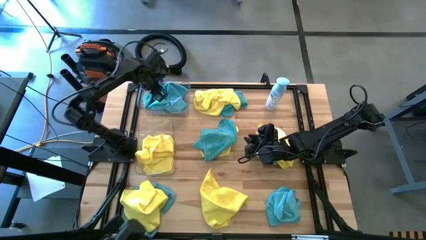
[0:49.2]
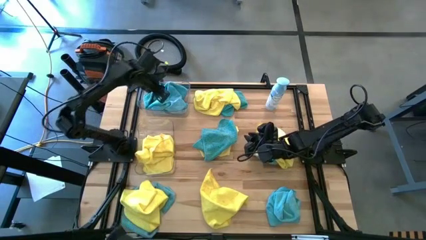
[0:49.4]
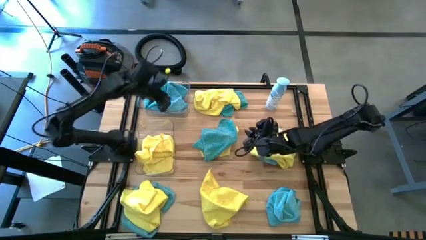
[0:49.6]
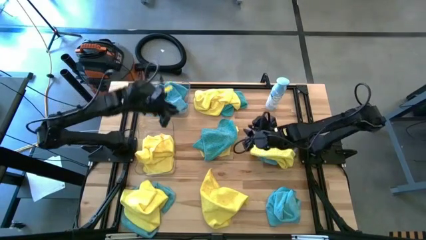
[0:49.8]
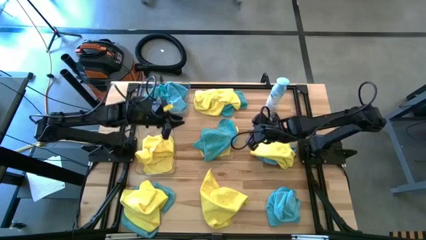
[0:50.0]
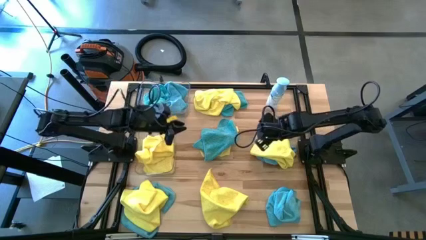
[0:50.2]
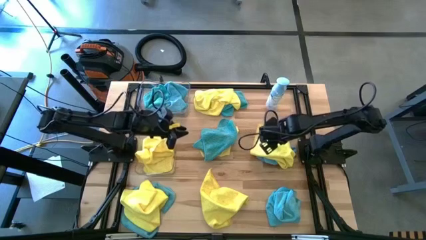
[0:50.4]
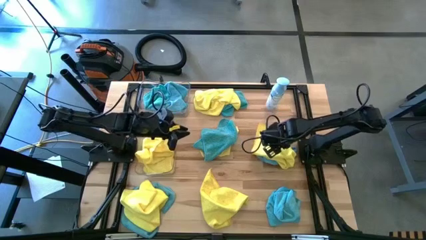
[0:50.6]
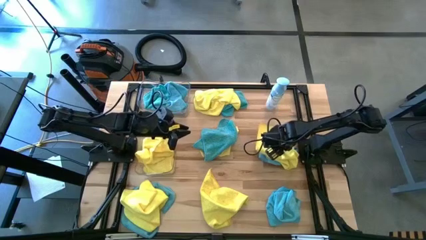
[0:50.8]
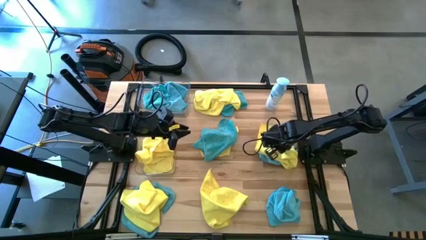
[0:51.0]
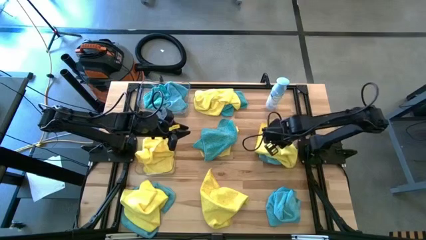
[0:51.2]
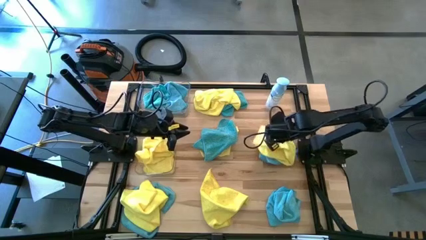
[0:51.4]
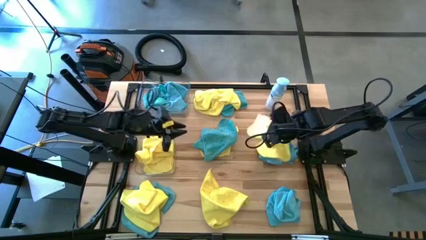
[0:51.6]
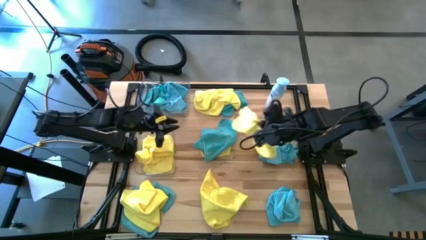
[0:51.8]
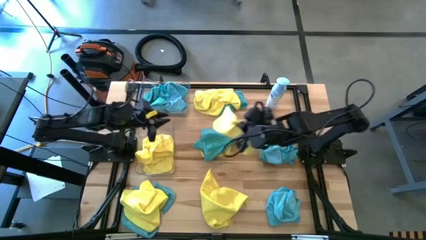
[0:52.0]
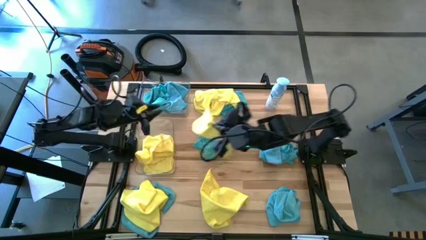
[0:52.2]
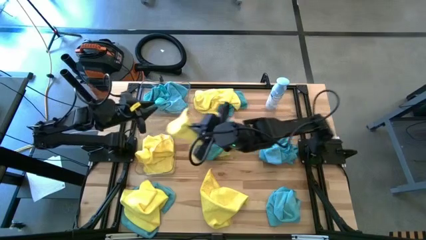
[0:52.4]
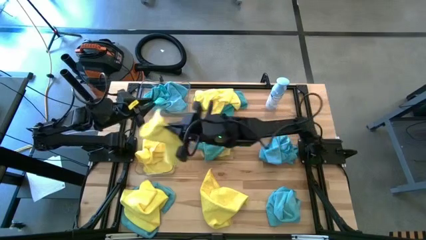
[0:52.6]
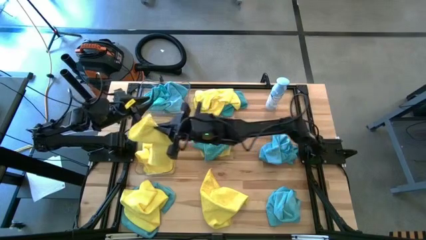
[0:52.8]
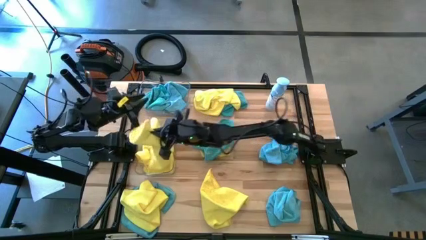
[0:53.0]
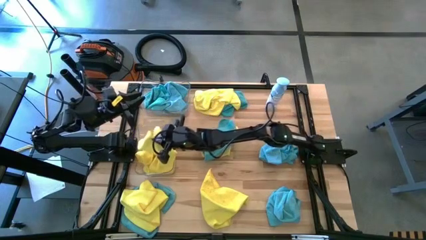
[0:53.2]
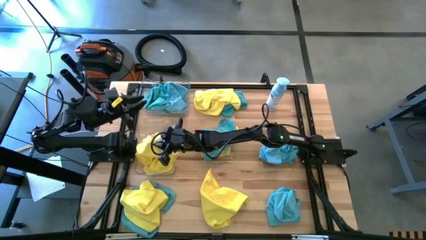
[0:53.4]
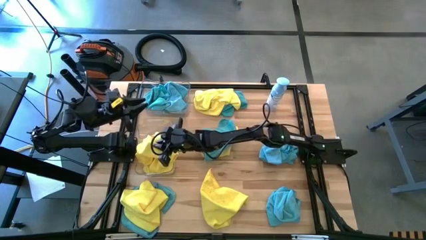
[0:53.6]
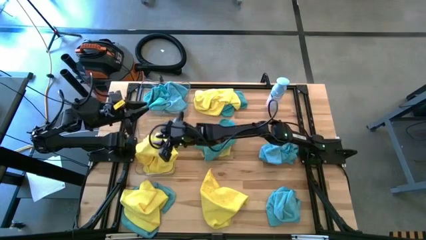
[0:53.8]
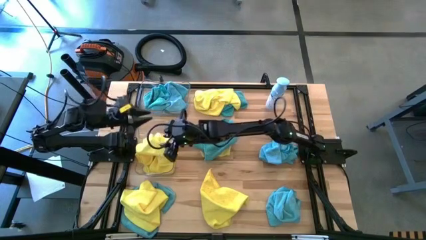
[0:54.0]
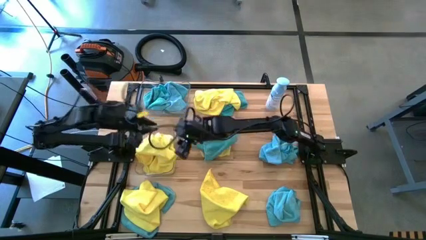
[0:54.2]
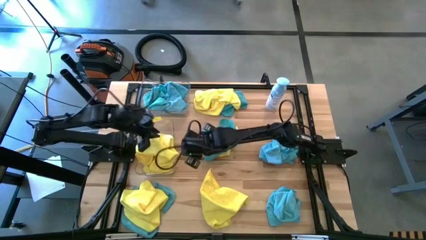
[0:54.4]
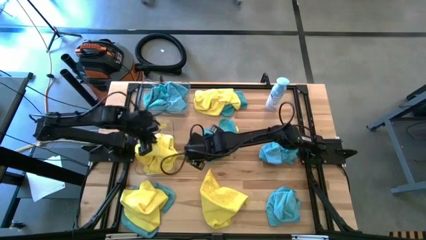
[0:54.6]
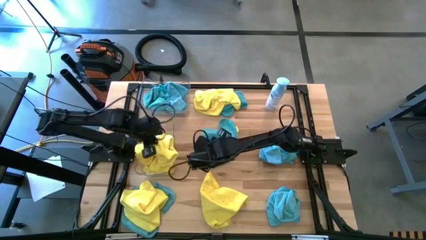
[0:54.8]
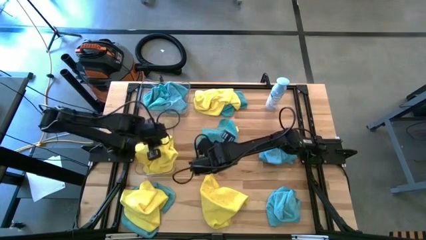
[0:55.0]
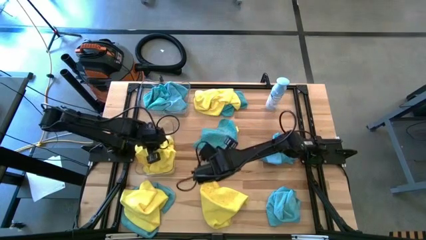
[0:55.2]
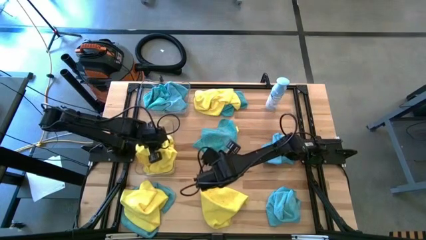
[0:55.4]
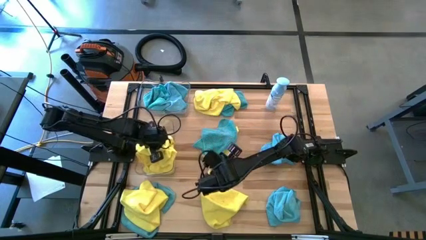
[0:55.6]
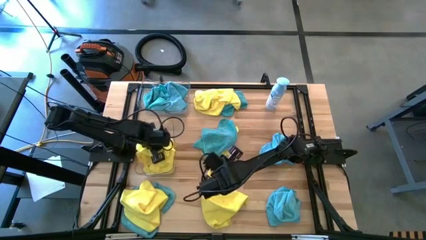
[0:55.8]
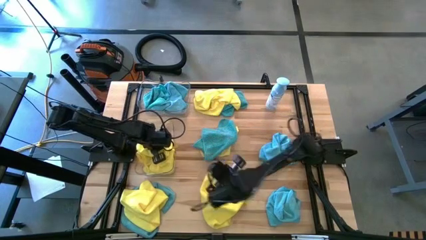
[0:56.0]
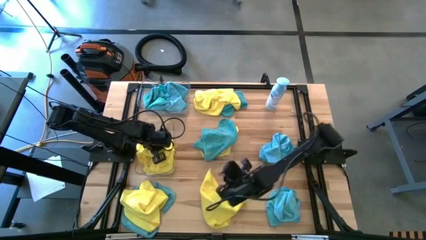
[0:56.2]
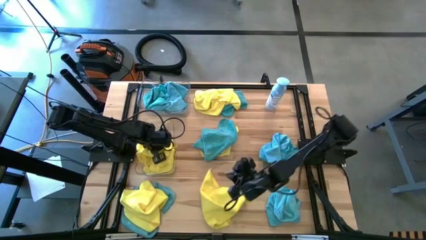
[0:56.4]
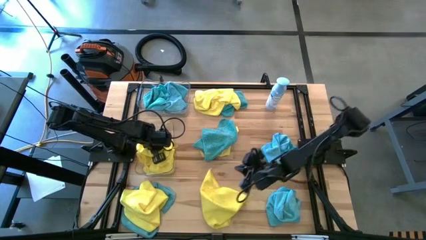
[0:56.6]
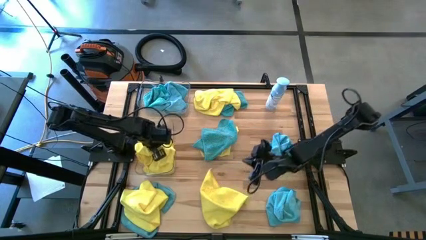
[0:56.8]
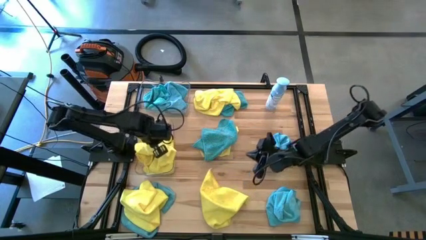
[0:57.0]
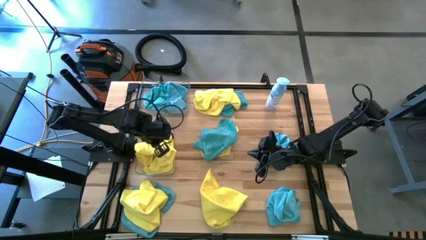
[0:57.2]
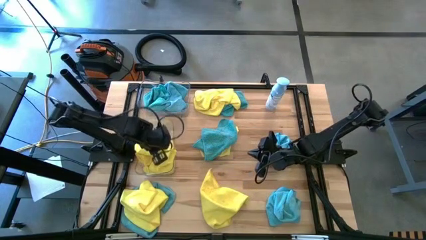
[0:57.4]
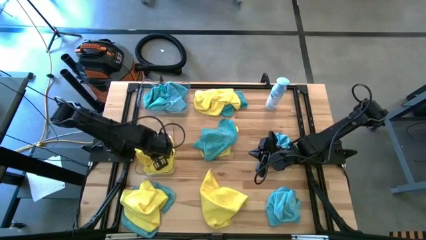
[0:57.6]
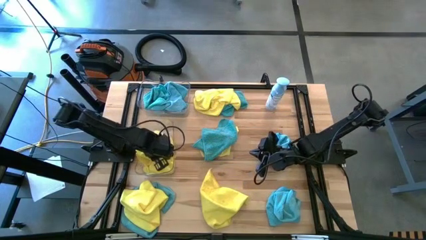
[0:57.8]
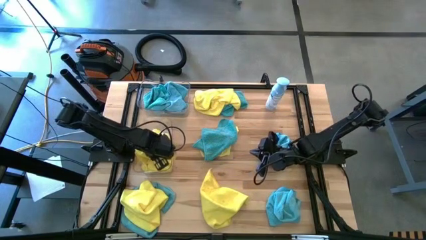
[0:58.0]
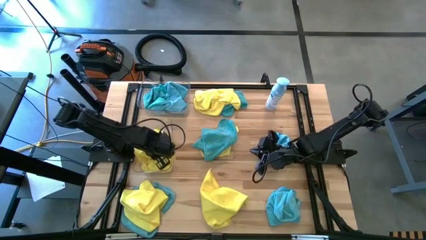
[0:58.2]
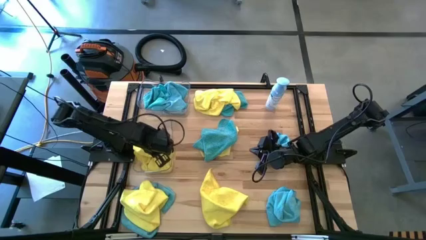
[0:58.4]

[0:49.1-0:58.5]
Task: Sort microfiber towel by color & place in baskets
Put the yellow towel into the bottom transparent bin

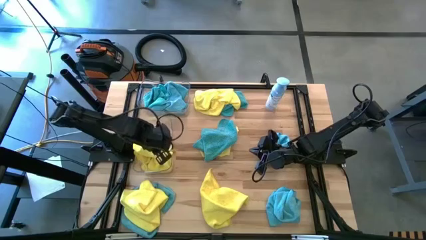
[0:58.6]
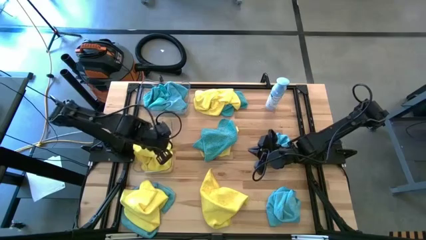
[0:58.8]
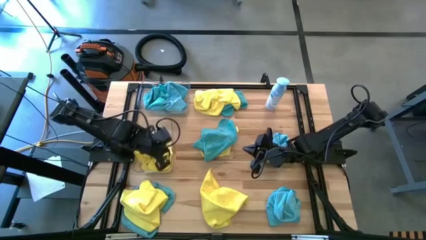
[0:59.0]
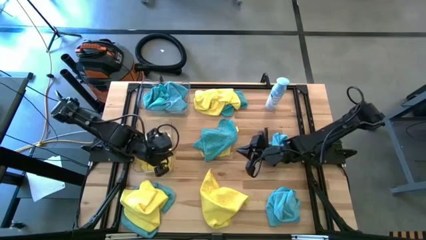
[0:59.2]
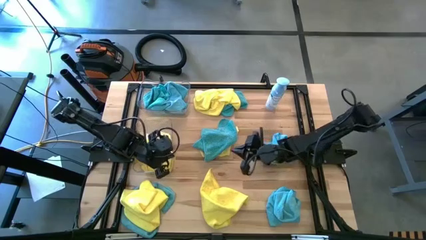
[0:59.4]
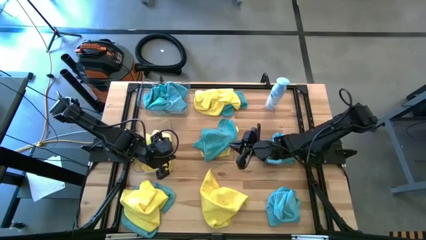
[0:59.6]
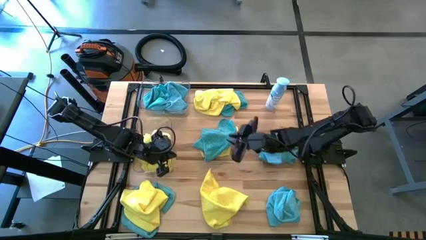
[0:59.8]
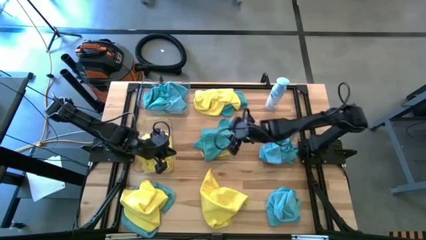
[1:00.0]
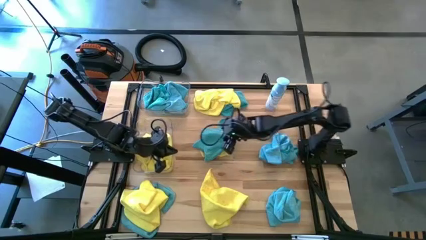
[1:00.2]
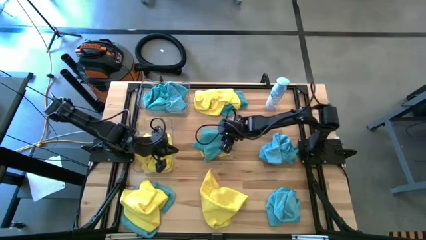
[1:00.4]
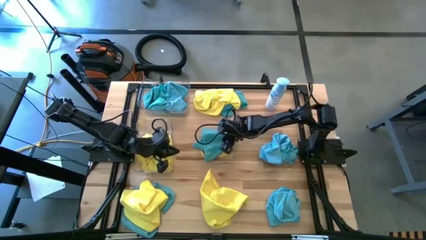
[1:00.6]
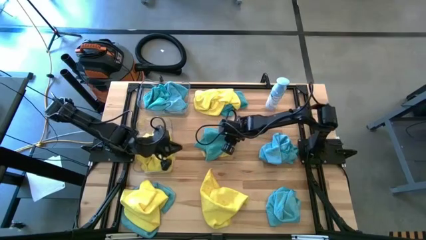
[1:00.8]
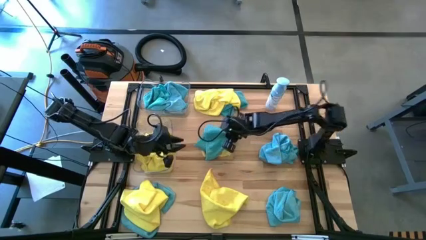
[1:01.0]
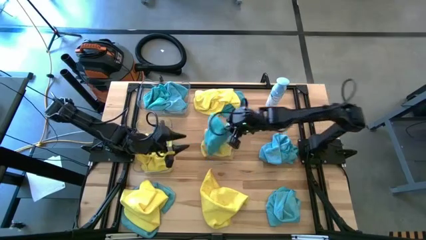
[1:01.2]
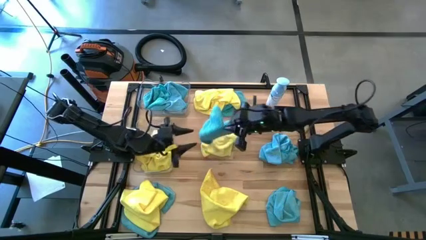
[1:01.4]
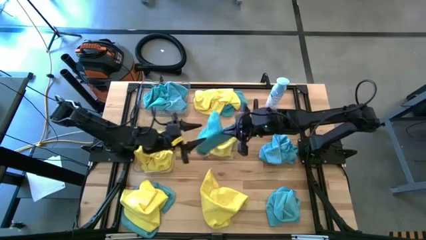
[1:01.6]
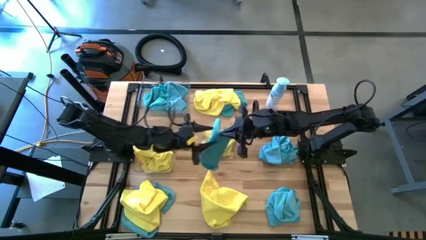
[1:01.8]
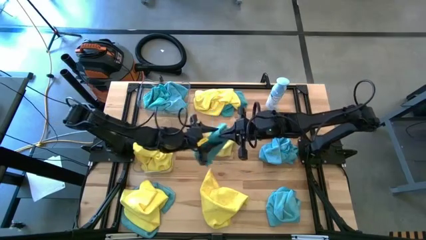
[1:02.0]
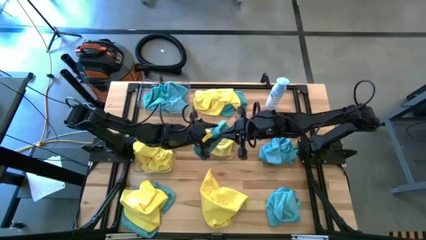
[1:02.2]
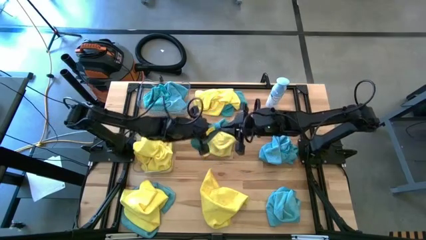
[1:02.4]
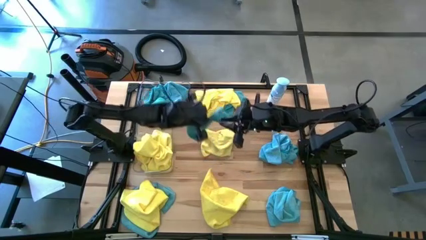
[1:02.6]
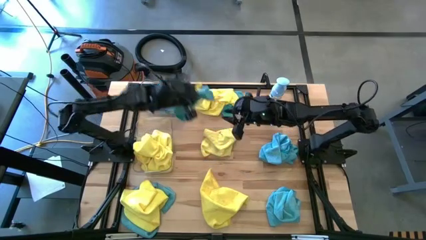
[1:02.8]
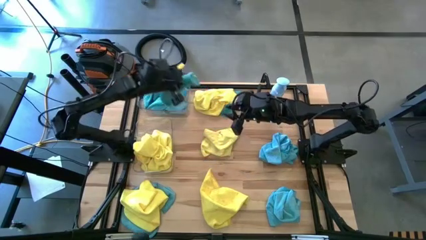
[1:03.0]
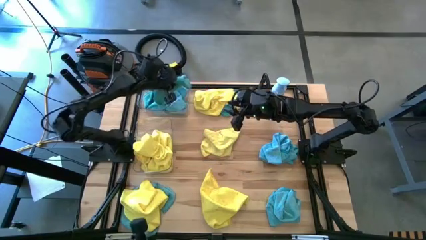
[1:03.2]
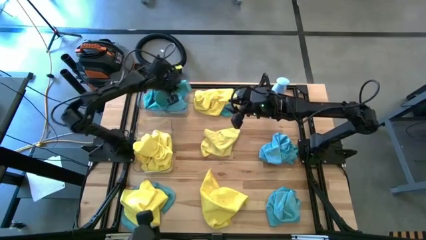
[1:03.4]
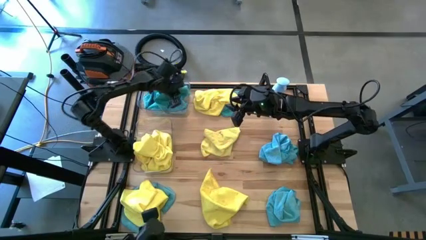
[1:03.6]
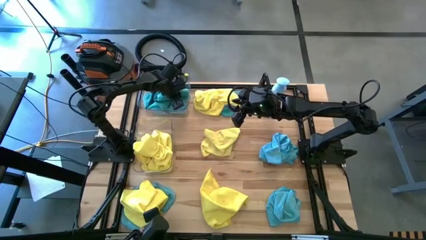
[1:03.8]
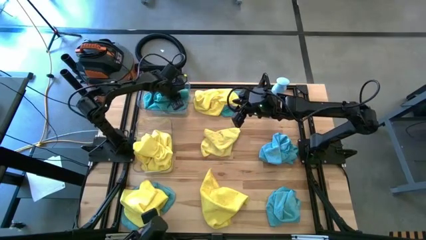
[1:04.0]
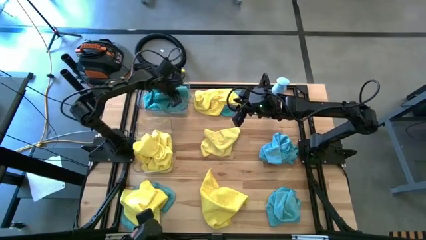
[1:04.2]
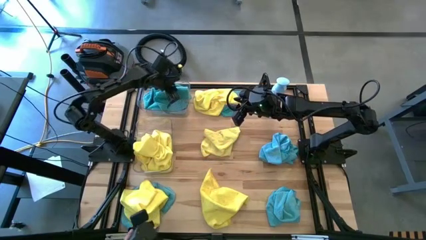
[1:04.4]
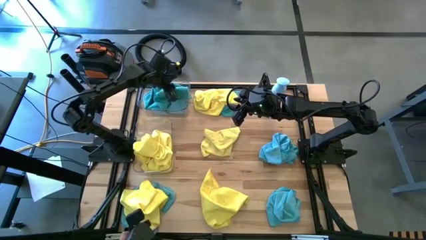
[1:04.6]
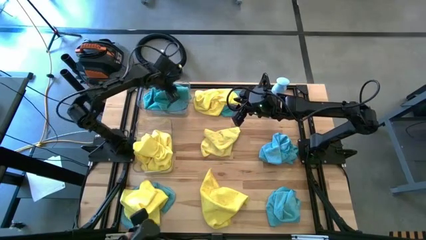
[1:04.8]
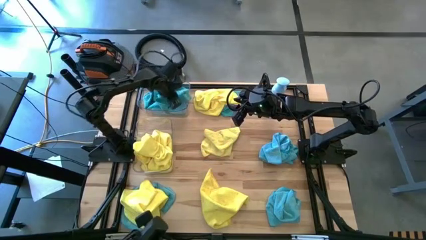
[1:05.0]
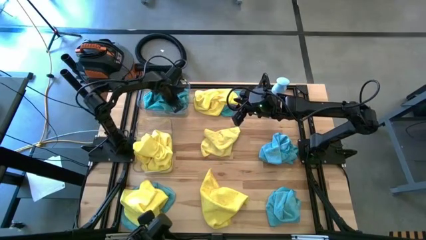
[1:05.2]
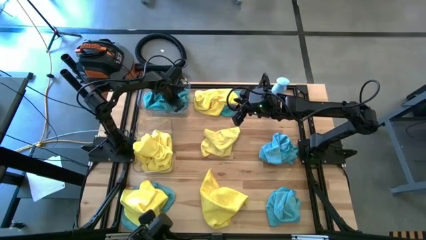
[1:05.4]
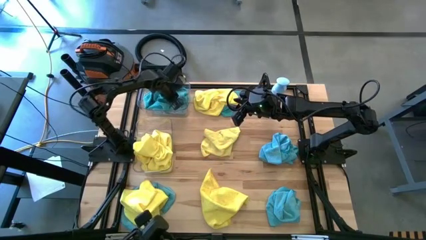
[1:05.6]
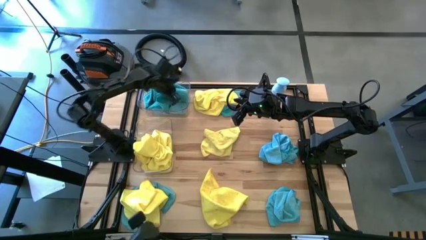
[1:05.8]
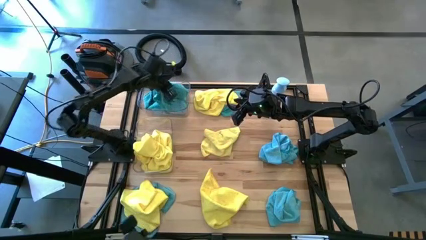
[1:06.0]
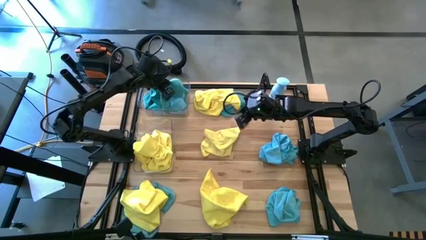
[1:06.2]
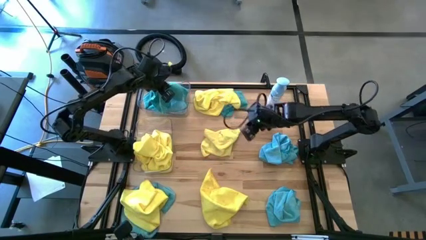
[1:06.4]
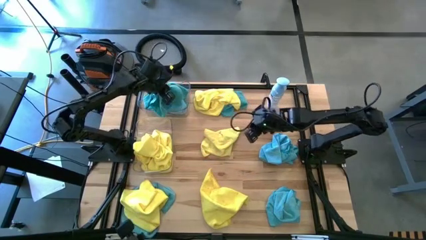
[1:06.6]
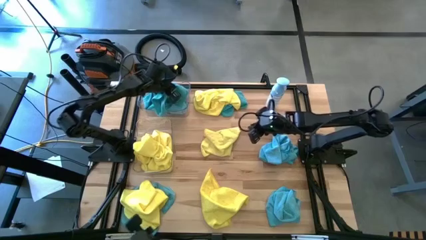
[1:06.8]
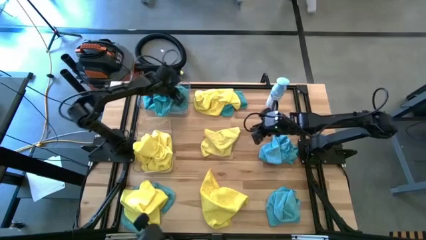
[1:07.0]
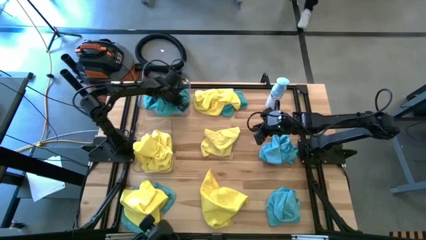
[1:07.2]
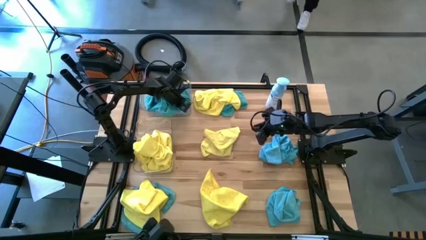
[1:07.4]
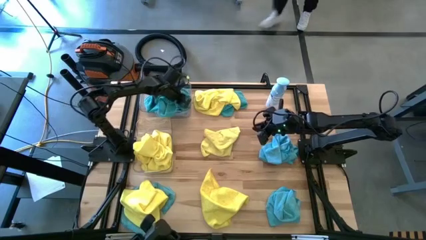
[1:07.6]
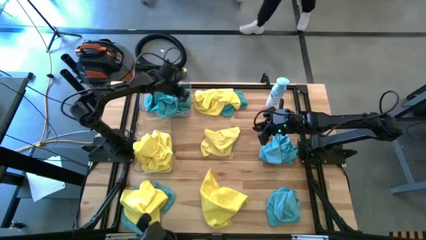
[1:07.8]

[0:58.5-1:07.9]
Put the blue towel into the top transparent bin
